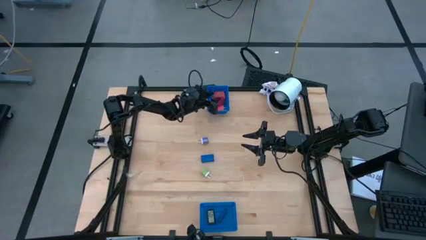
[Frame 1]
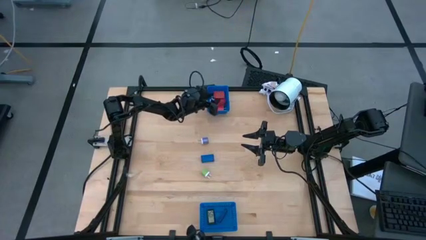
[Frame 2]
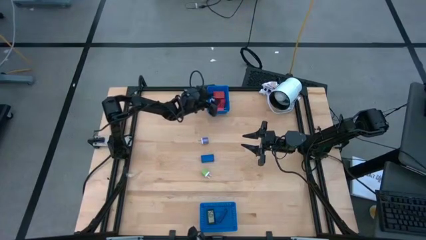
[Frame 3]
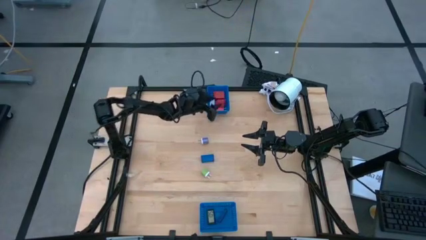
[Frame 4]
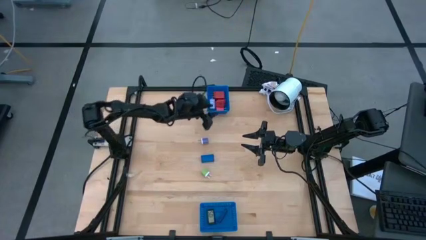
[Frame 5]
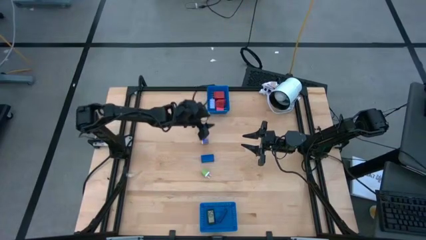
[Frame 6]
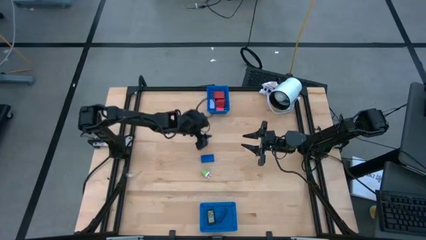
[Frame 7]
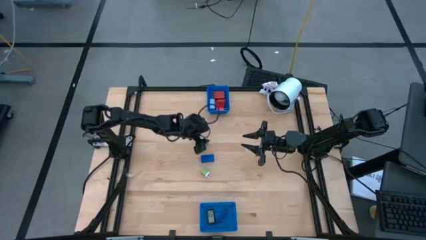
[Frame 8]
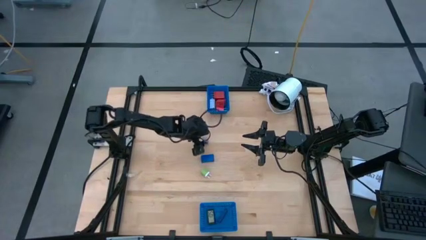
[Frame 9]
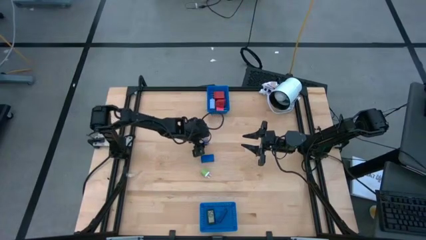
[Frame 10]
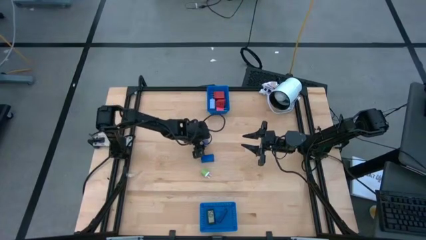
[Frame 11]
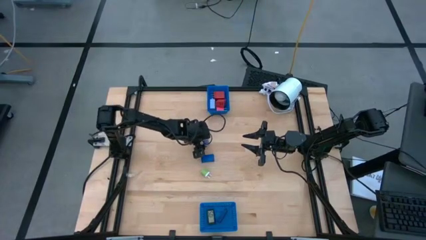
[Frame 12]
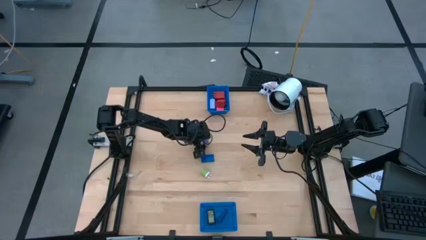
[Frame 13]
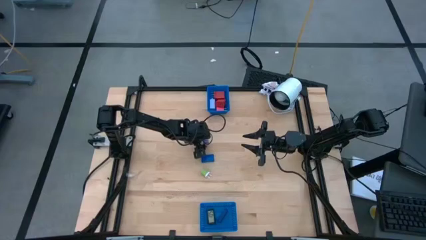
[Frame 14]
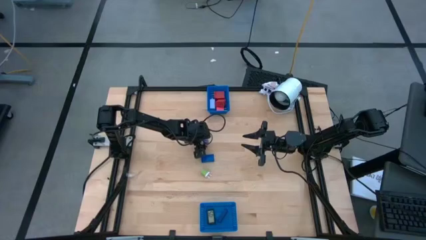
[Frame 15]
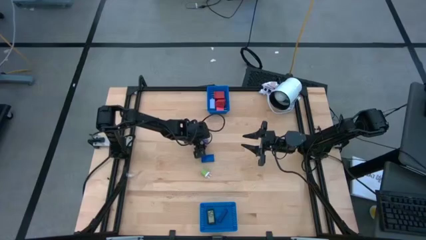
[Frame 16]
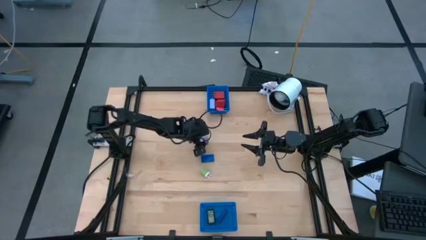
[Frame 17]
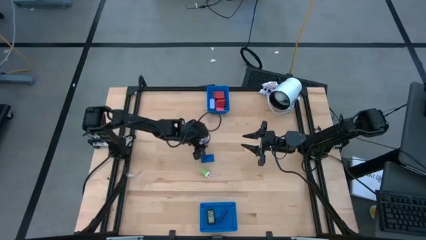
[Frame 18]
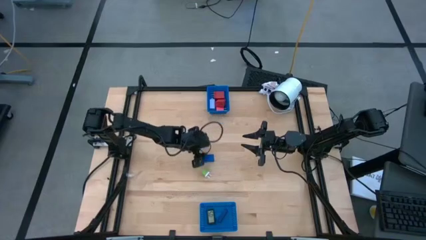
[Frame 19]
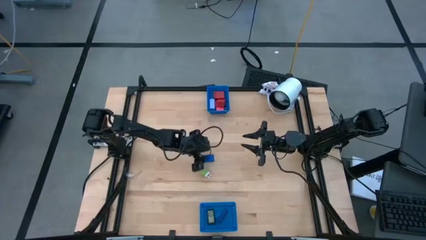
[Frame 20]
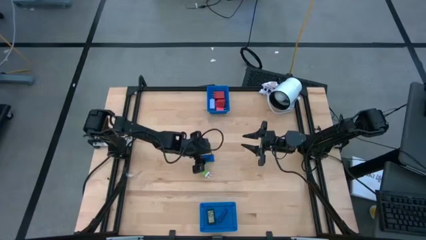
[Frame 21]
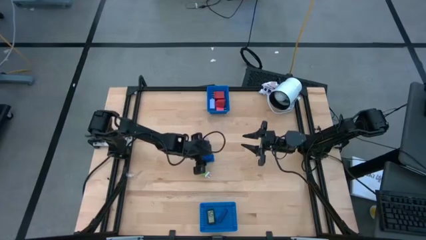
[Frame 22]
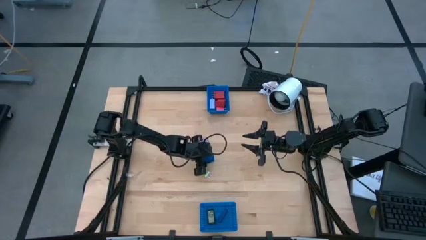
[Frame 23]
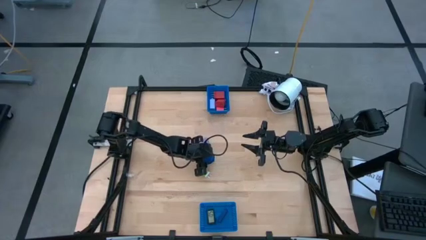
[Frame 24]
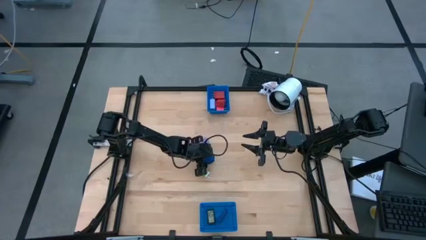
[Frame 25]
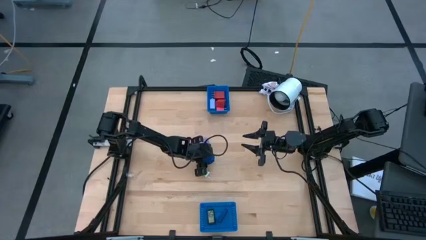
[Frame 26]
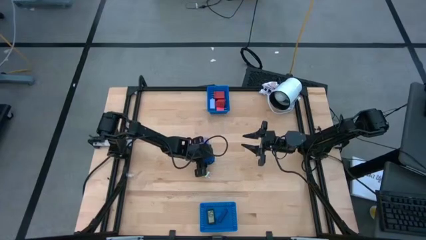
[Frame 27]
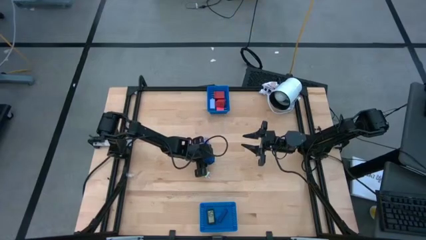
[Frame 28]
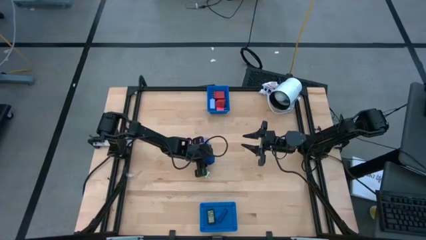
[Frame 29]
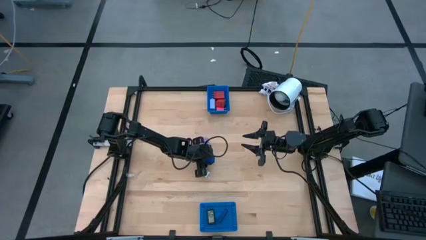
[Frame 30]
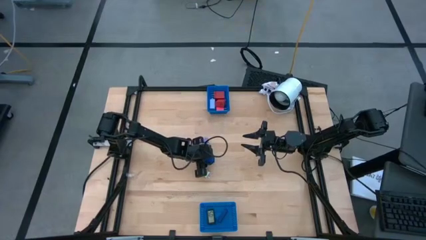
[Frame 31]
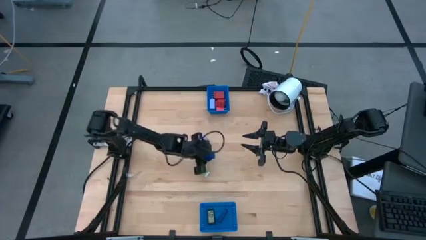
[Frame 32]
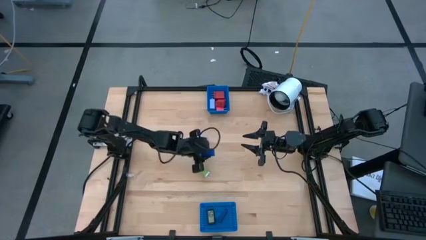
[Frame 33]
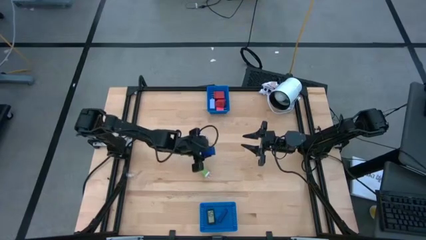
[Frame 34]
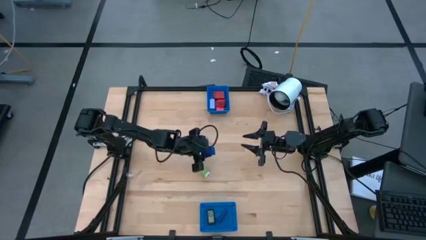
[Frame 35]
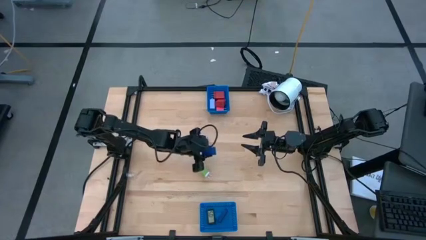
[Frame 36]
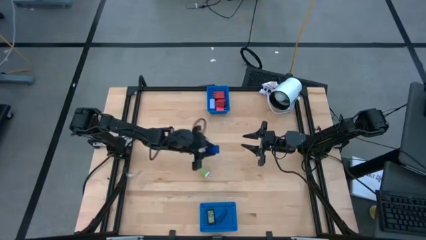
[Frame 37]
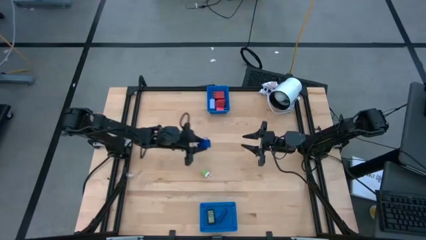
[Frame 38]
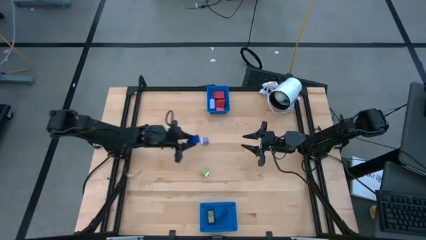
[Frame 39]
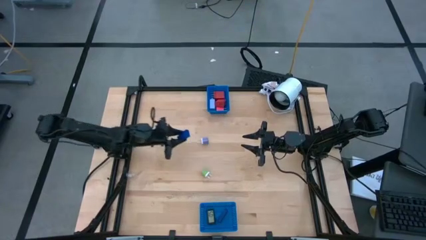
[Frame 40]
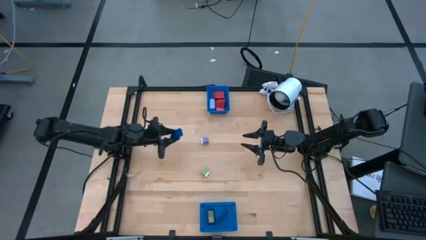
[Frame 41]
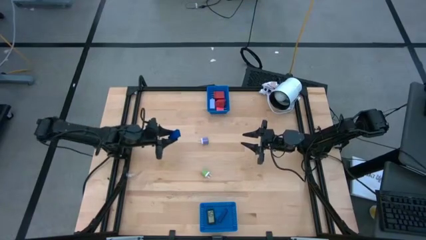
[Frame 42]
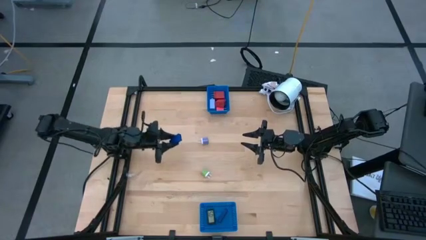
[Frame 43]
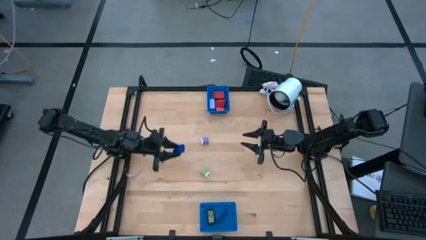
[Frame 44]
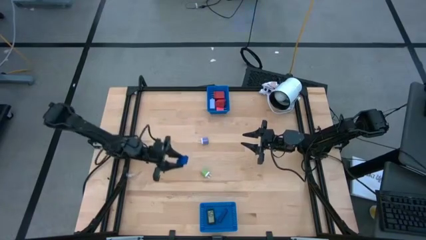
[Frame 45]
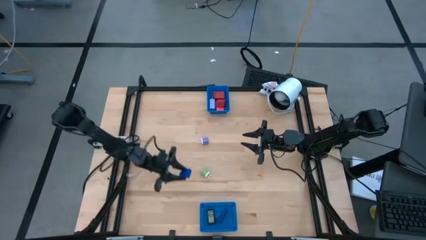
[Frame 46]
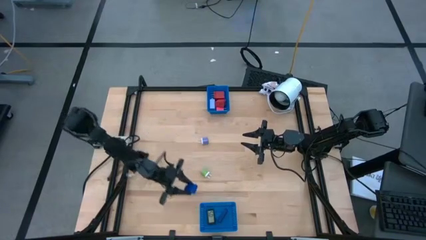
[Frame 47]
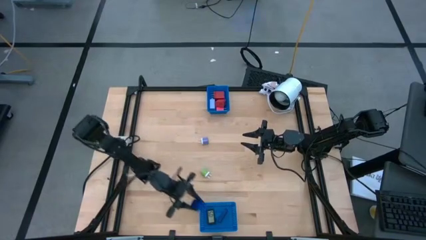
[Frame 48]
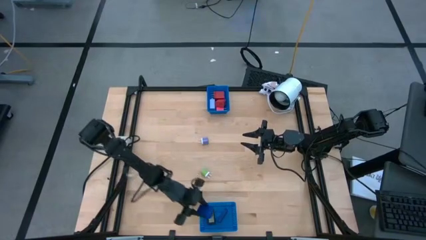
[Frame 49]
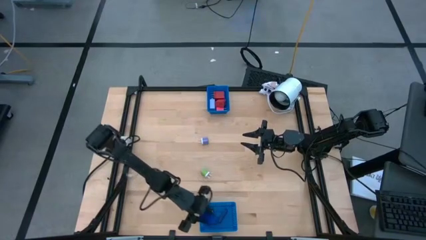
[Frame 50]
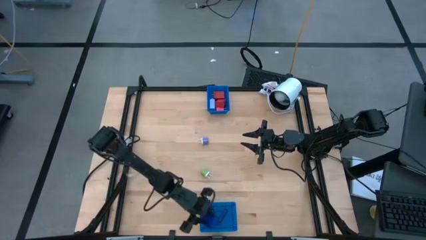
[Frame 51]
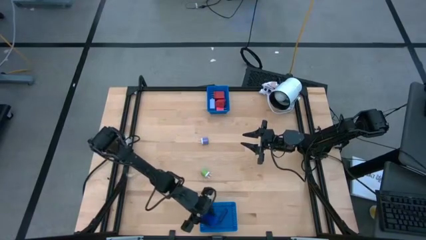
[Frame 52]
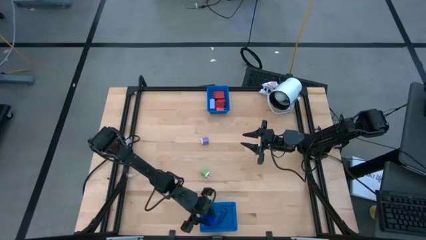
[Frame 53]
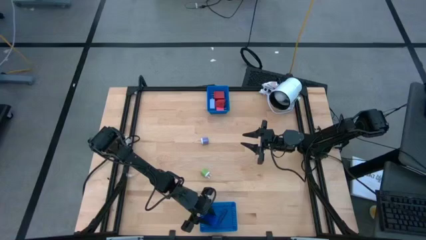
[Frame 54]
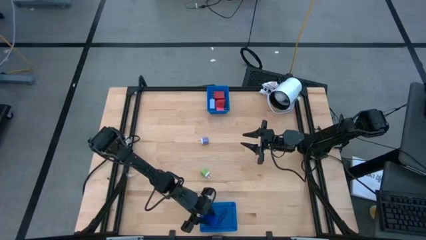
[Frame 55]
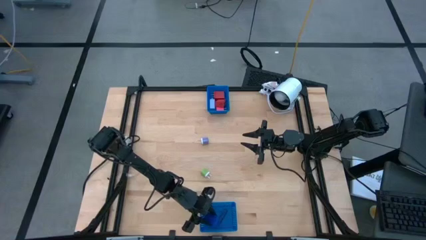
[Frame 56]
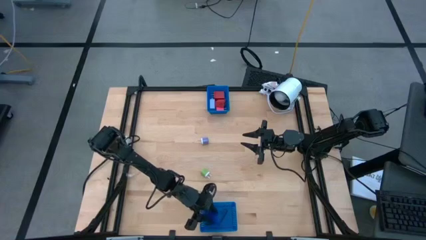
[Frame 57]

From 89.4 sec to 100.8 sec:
Task: Pick & Place Office items
Put the blue digital timer into the bottom blue bin
